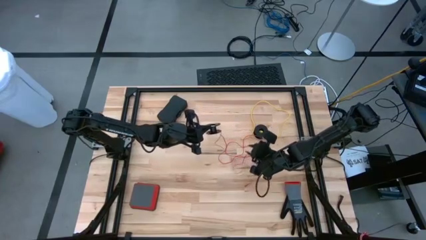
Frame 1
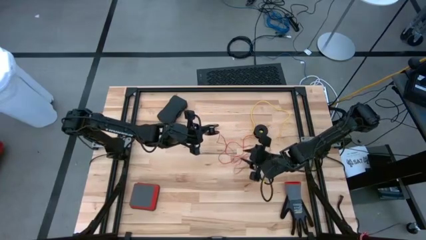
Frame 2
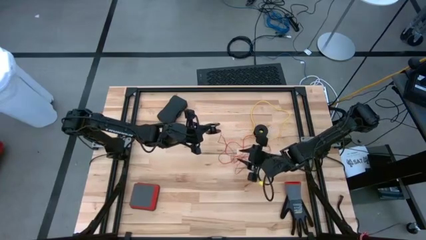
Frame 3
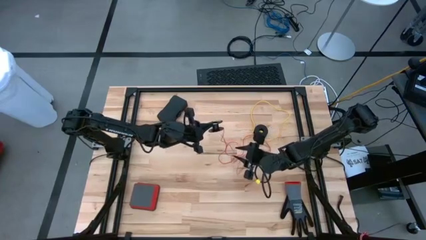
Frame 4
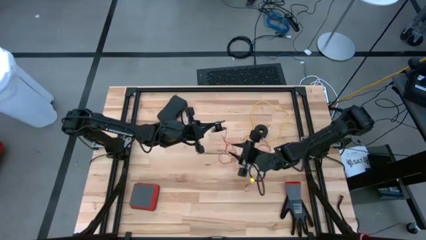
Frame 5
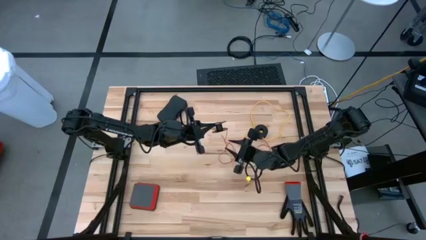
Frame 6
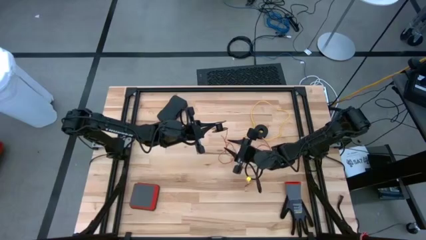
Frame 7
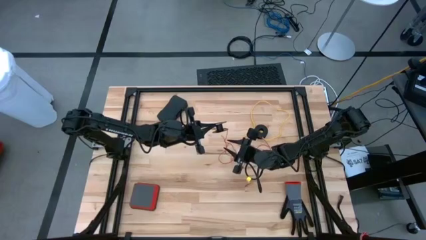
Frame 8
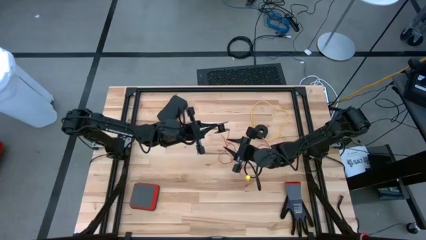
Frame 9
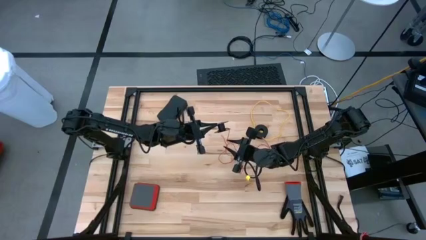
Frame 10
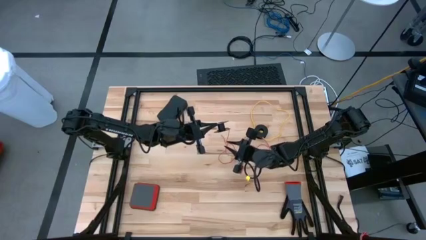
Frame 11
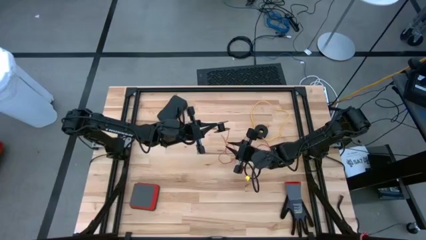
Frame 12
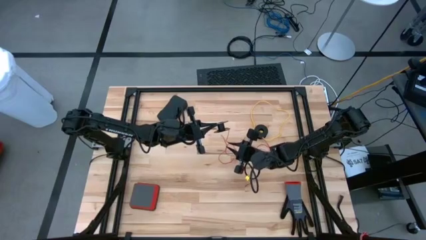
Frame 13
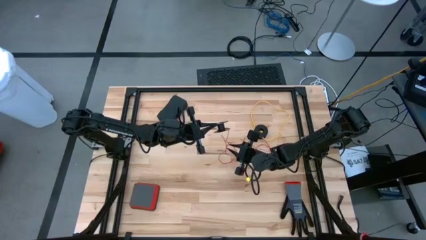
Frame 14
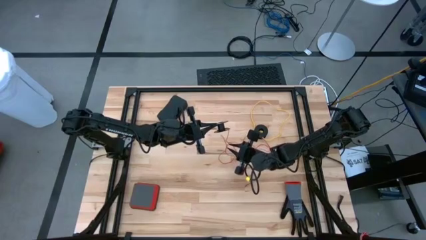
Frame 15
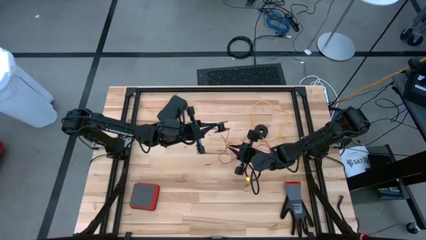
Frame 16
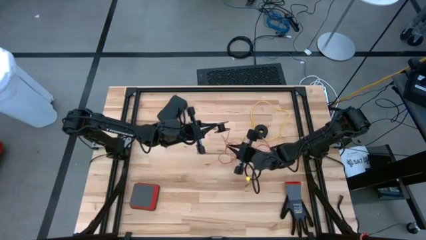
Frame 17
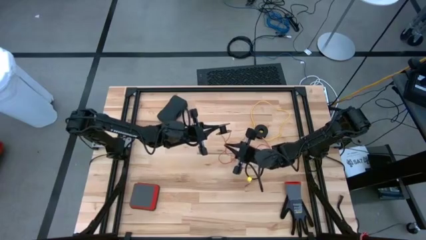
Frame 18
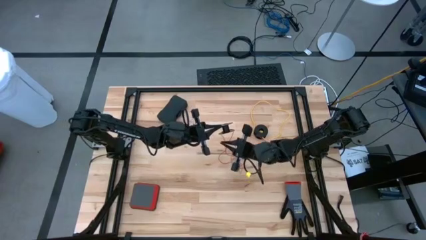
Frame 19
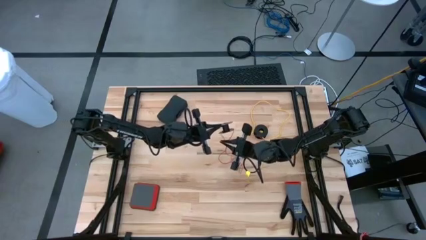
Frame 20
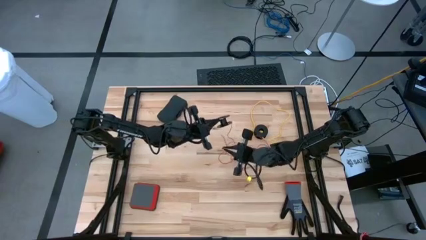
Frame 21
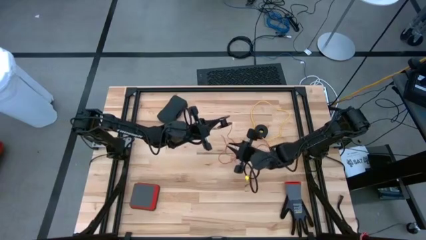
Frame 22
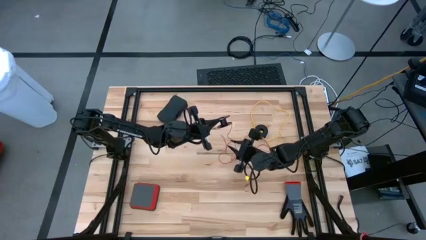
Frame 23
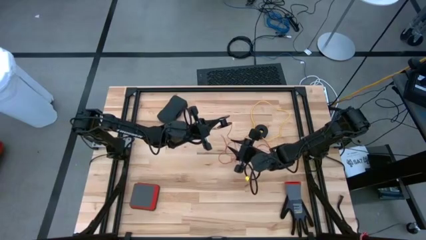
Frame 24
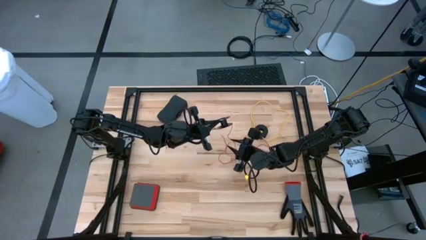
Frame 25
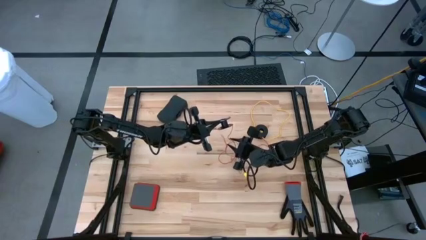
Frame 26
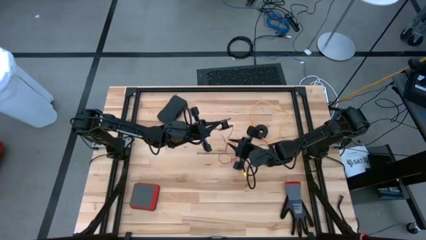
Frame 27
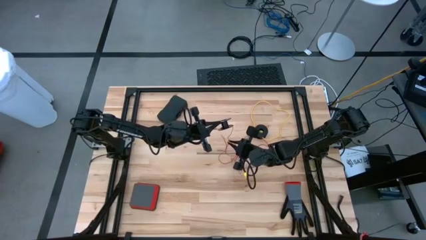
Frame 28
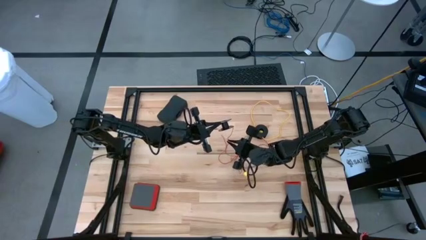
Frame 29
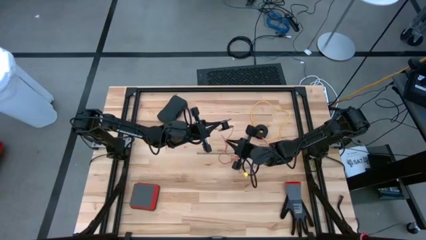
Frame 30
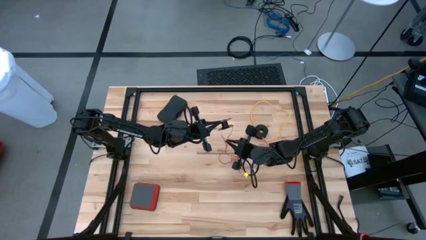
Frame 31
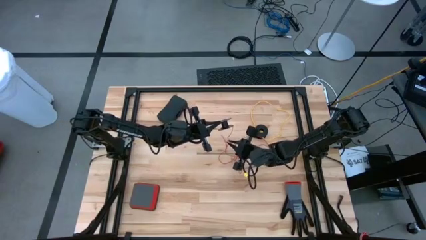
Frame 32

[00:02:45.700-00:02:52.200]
Task: Coil cords
Coil the red wire onto the black spool
